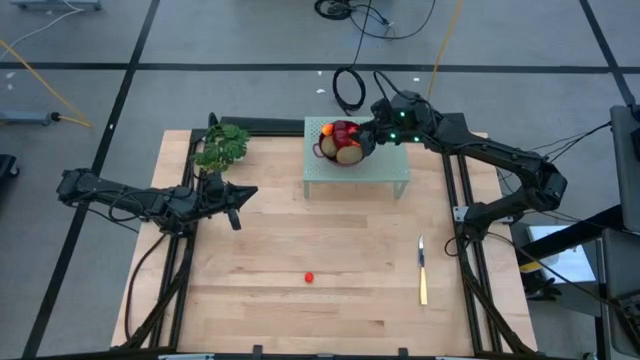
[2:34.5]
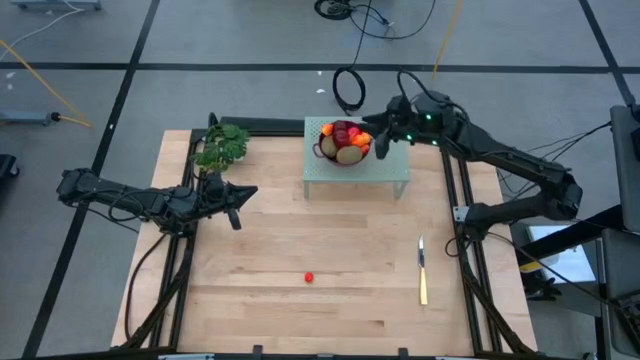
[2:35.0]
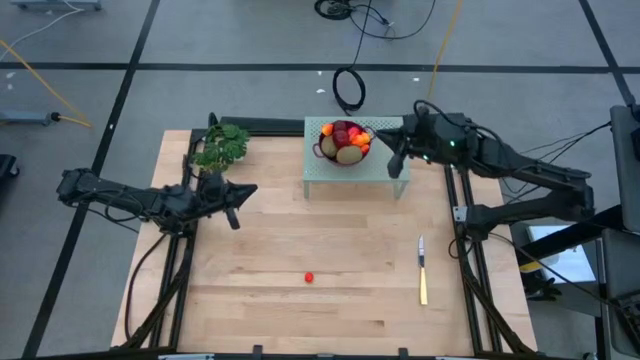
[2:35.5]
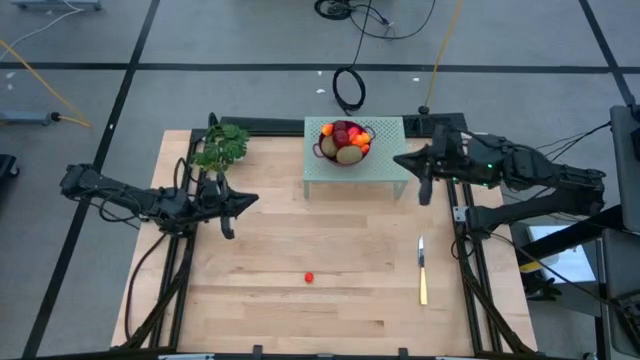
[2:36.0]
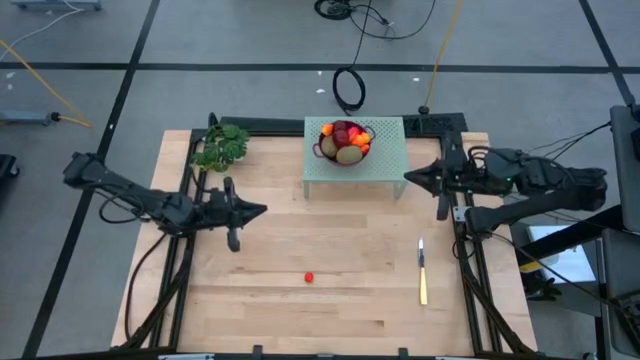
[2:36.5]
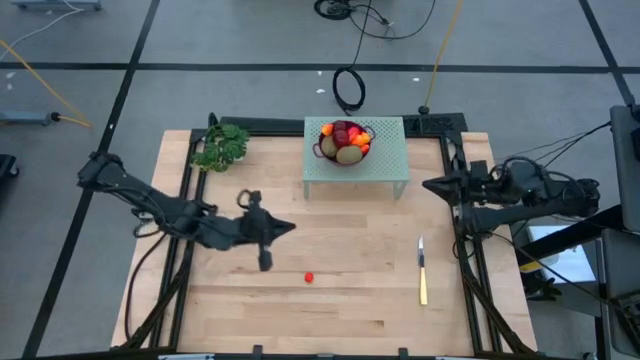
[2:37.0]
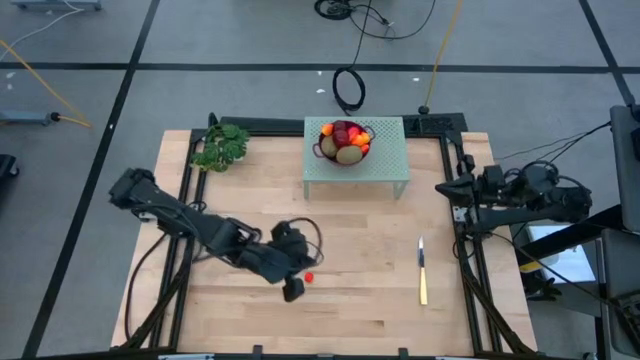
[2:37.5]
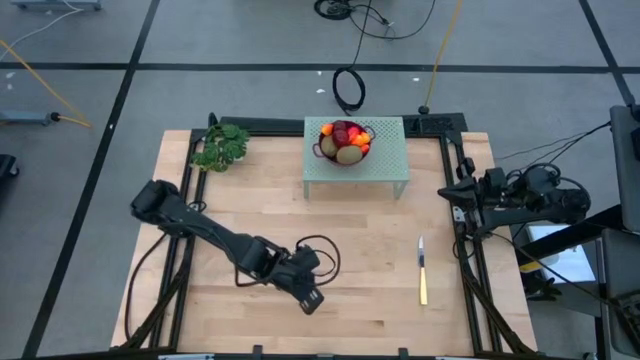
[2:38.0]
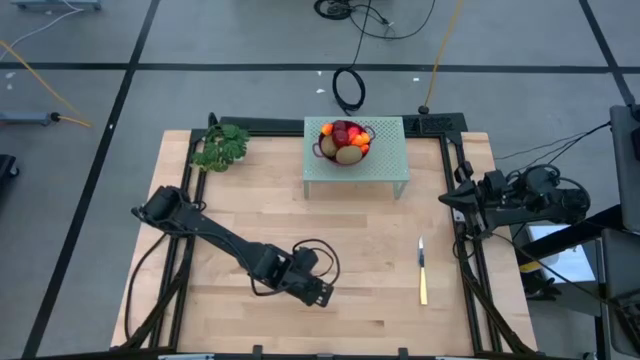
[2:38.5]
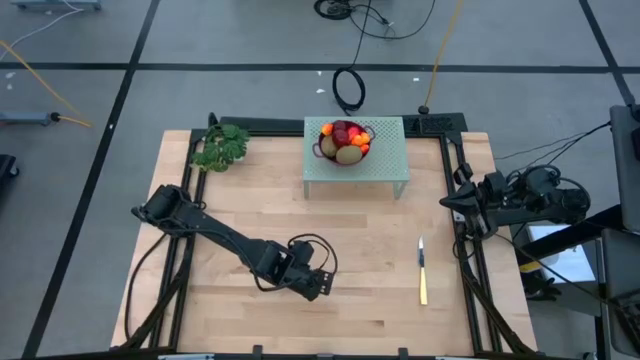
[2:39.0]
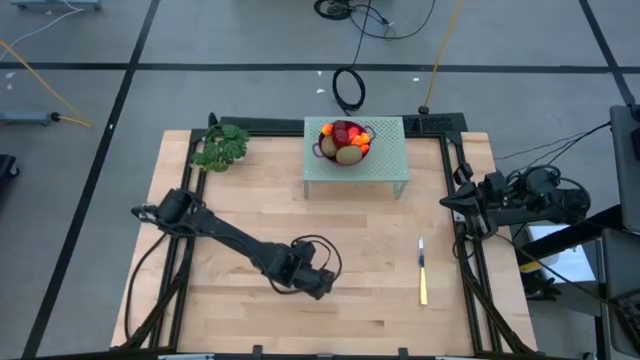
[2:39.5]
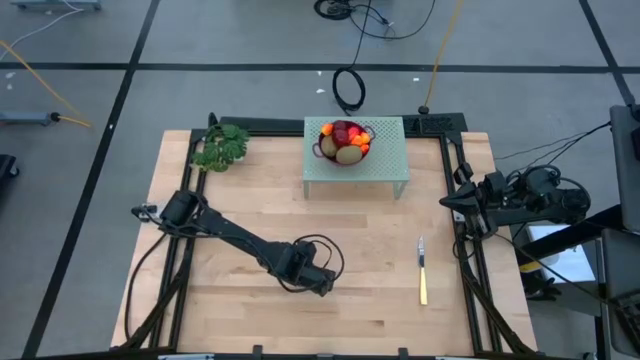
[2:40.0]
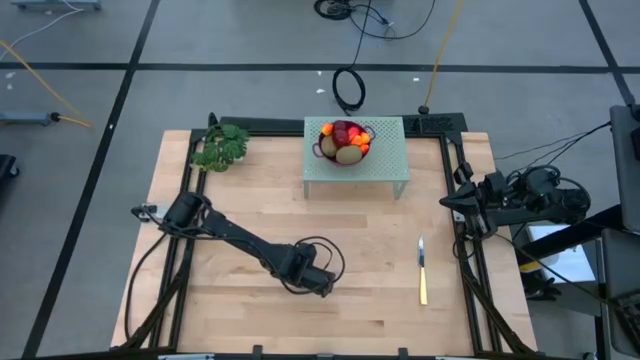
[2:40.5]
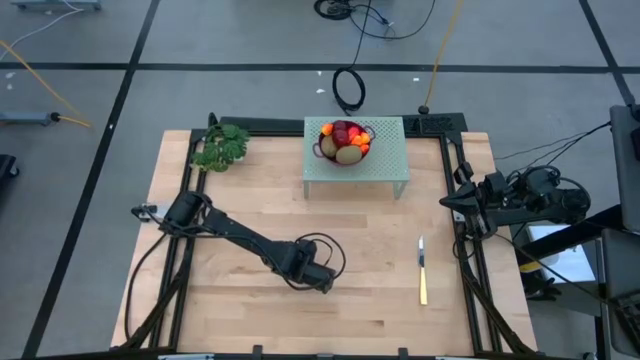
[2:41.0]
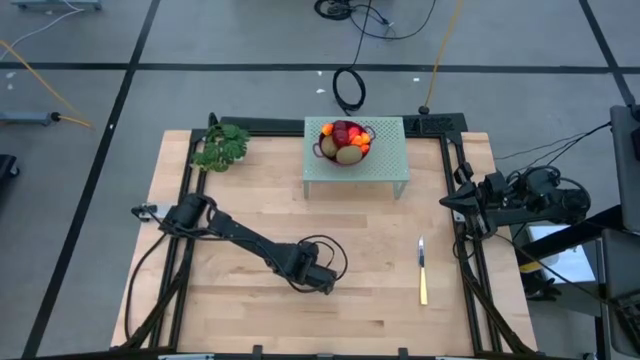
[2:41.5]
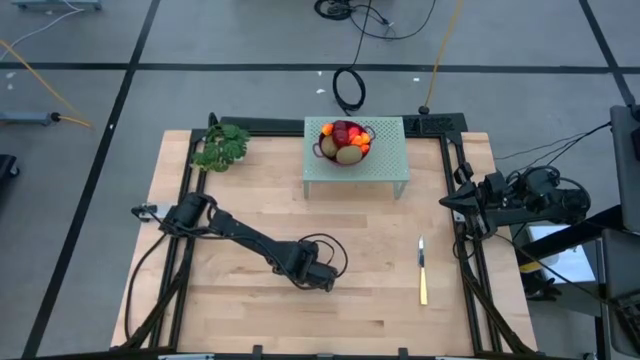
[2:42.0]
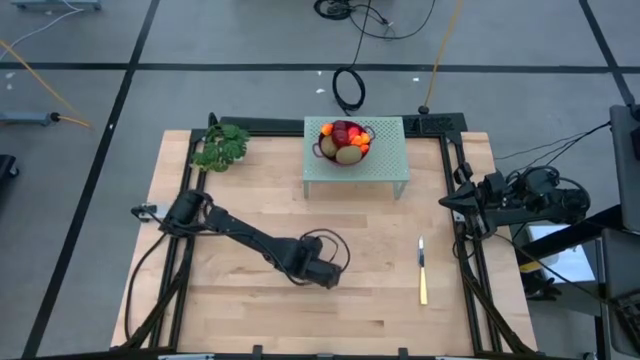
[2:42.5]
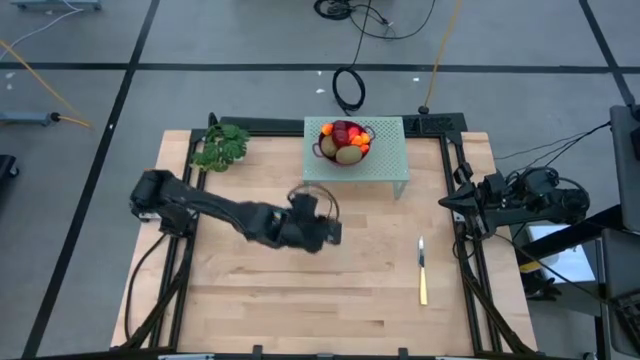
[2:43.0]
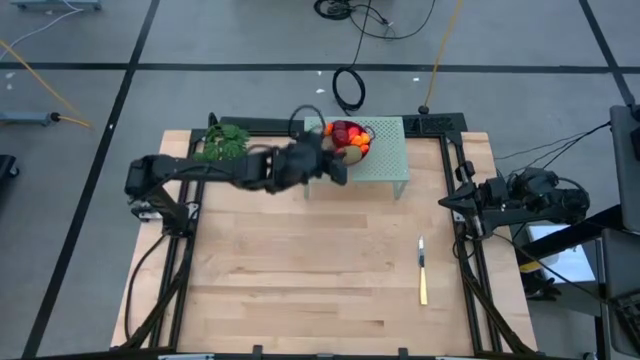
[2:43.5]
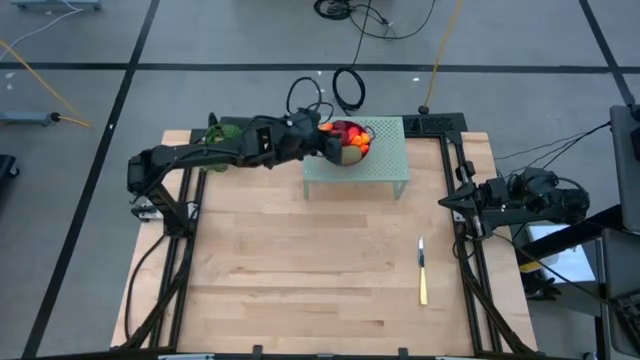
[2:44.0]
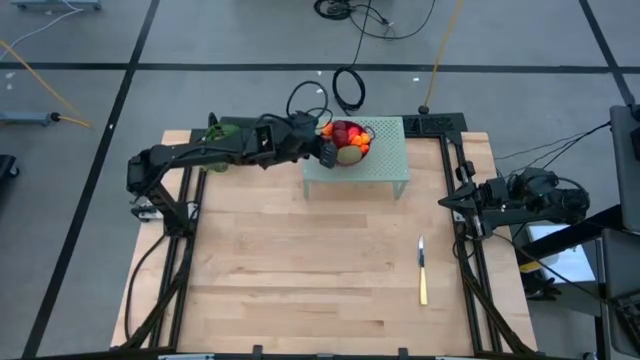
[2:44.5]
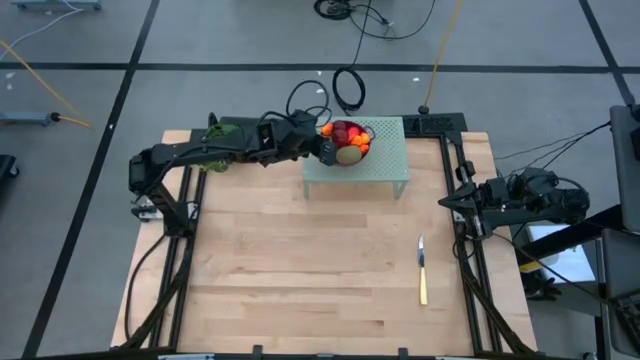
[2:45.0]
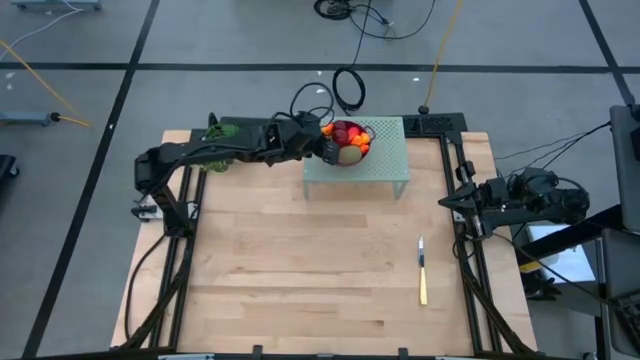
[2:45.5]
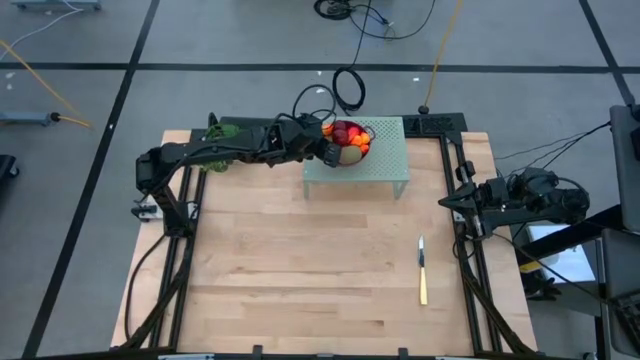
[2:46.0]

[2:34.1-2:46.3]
Task: Pick & Place Fruit
Put the tomato into the strainer bowl

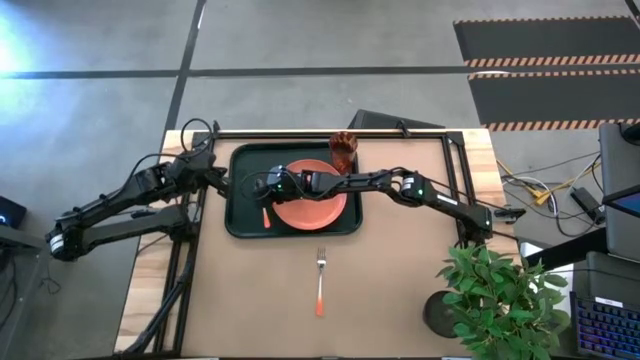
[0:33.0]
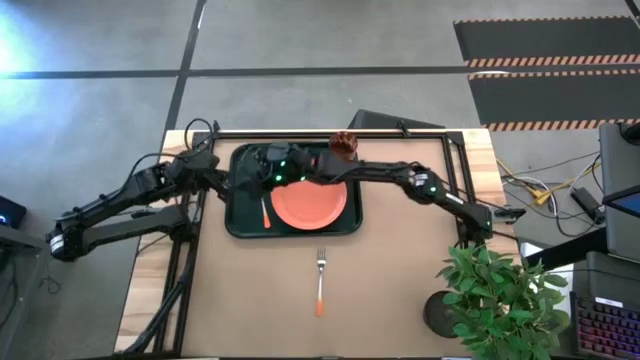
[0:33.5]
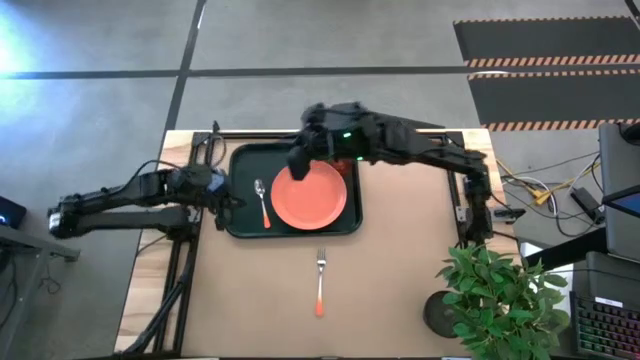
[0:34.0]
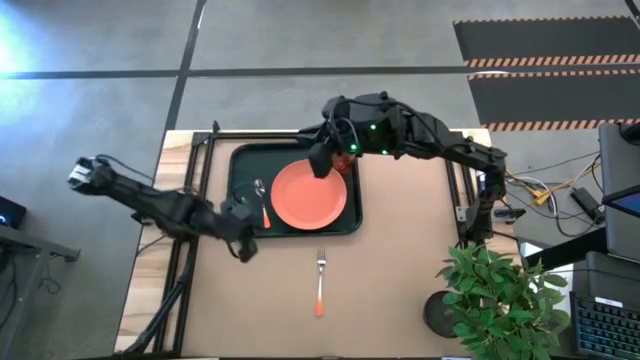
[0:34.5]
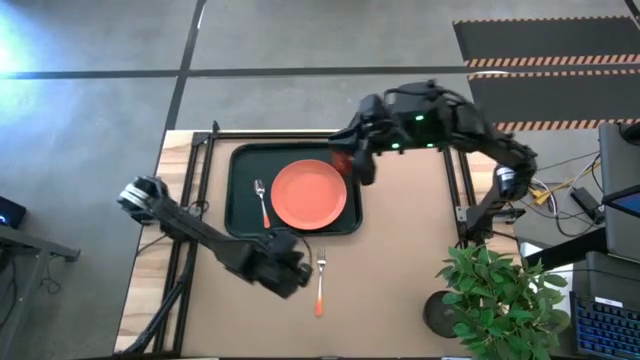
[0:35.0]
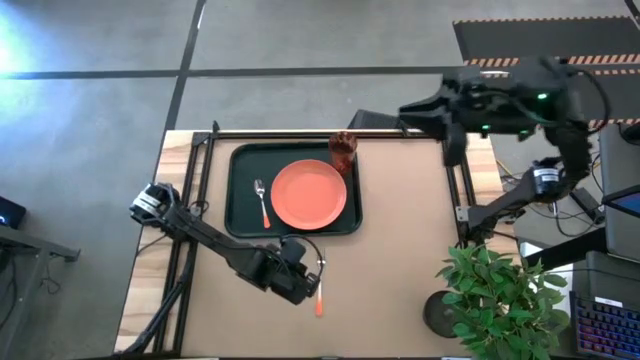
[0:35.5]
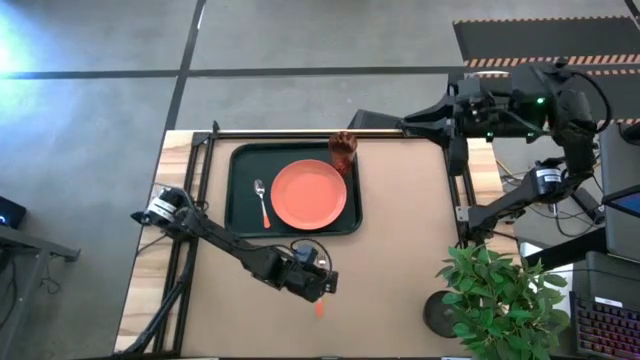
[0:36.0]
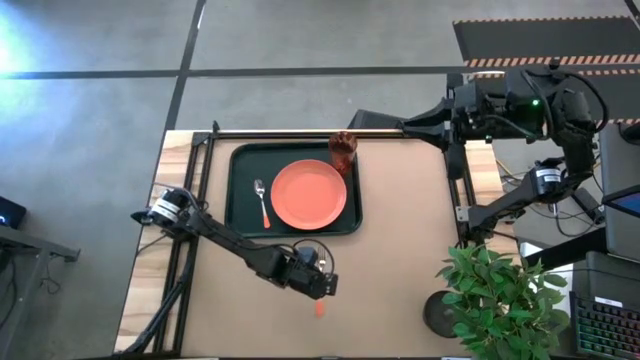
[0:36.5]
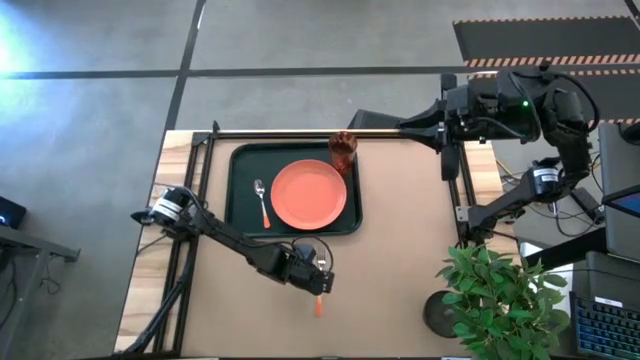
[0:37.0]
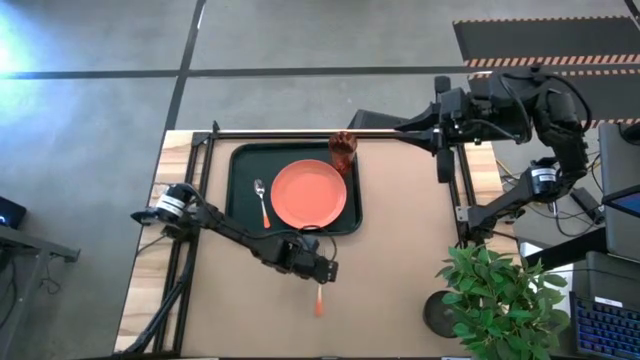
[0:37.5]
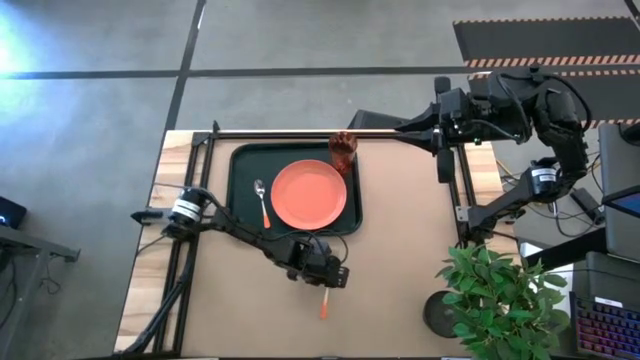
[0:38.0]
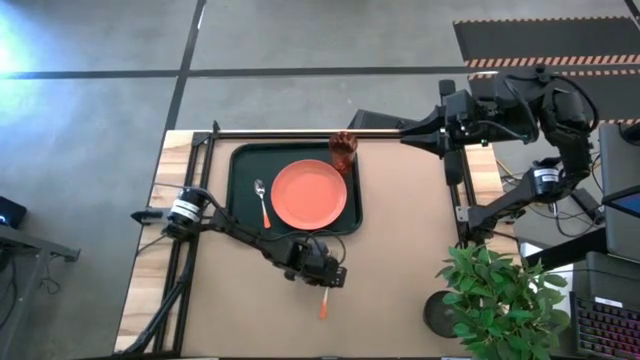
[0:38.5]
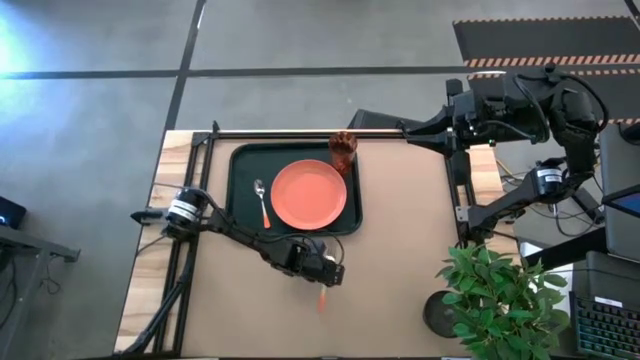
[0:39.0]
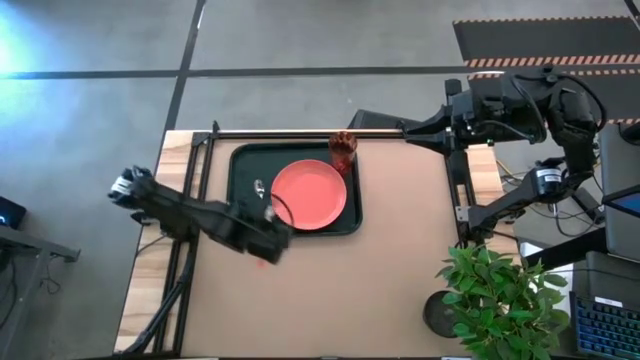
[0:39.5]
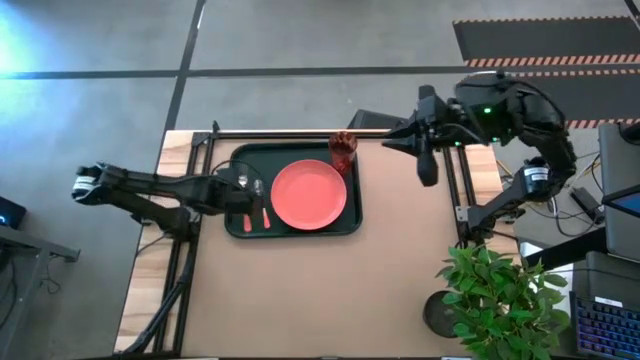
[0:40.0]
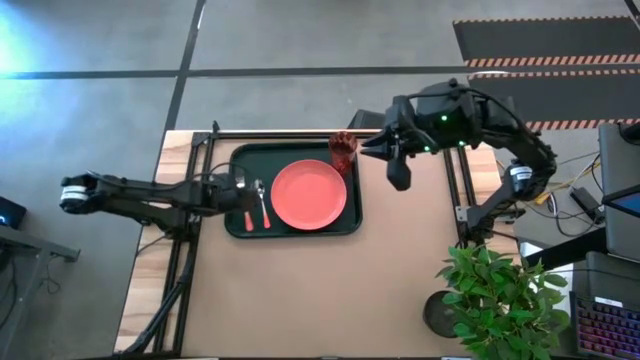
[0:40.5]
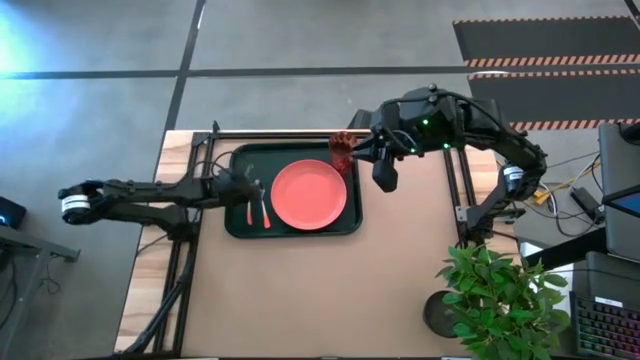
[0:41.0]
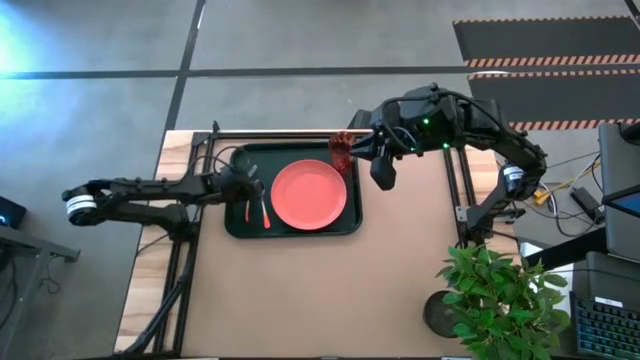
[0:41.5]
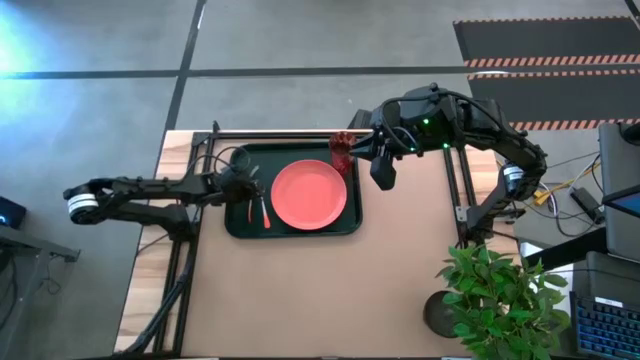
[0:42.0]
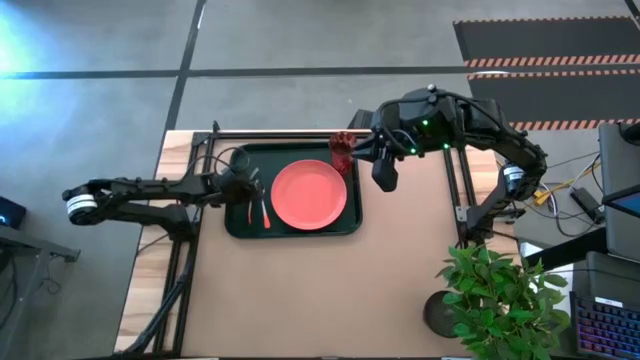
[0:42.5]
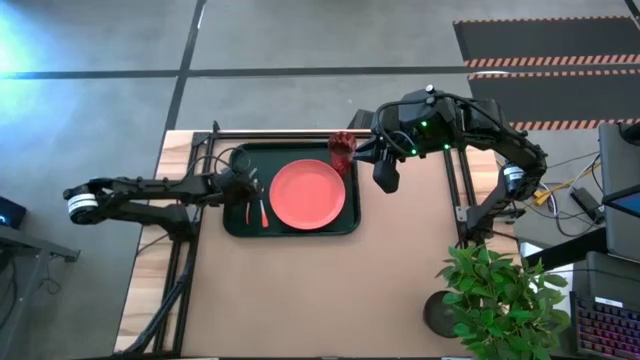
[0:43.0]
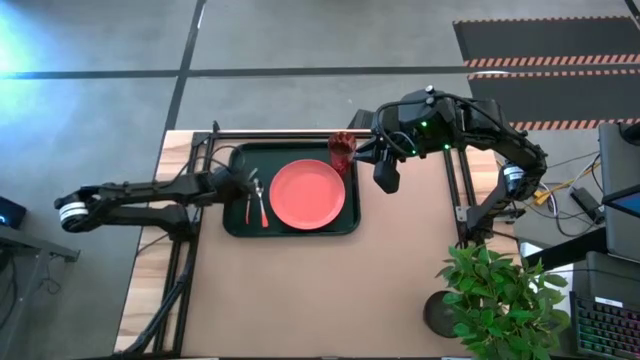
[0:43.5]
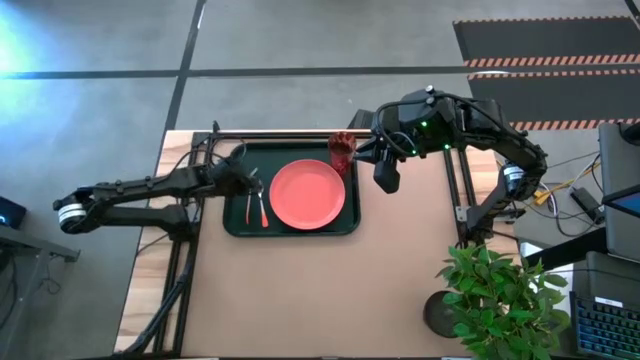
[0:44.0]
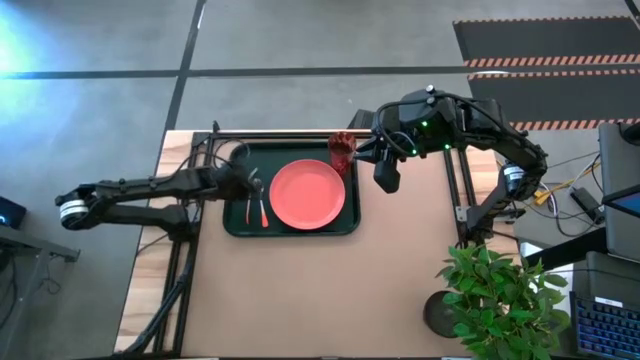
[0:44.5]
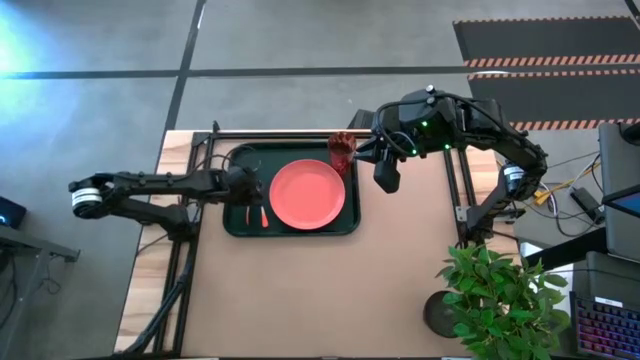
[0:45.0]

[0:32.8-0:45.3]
Task: Pick and place plate/cup/fork/spoon on tray
Put the orange fork beside the orange spoon on the black tray
